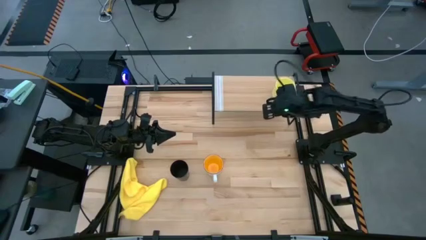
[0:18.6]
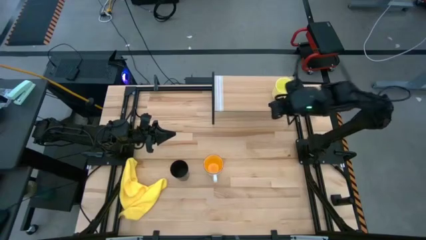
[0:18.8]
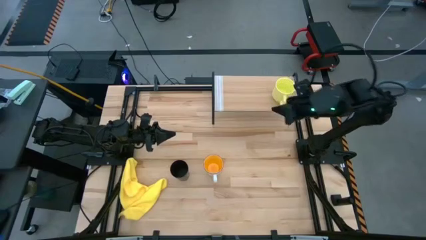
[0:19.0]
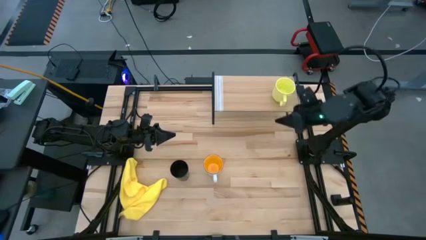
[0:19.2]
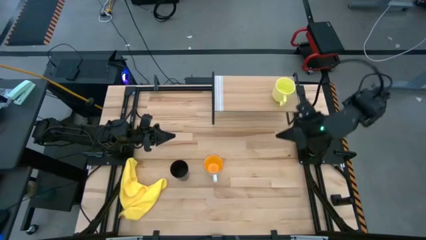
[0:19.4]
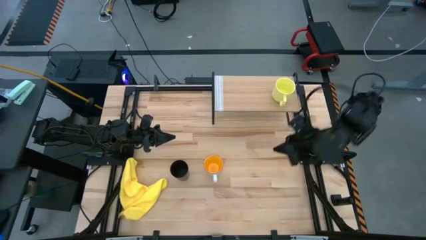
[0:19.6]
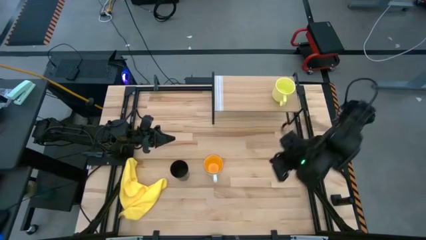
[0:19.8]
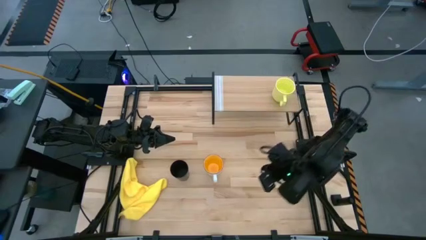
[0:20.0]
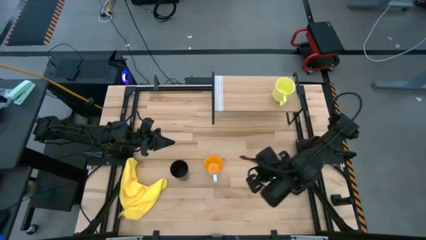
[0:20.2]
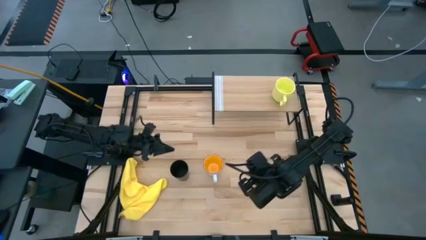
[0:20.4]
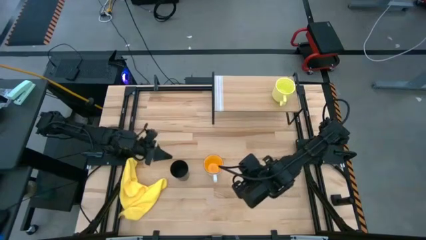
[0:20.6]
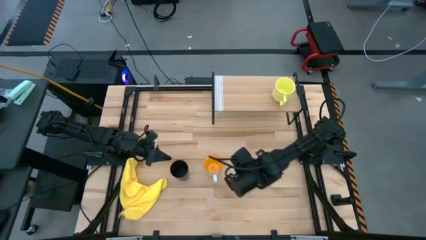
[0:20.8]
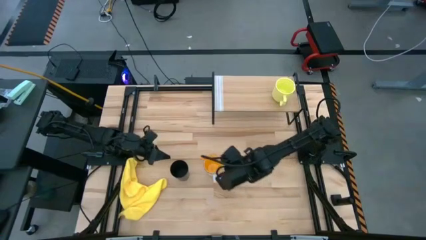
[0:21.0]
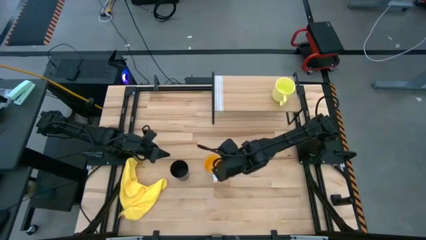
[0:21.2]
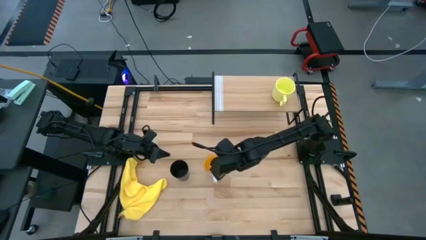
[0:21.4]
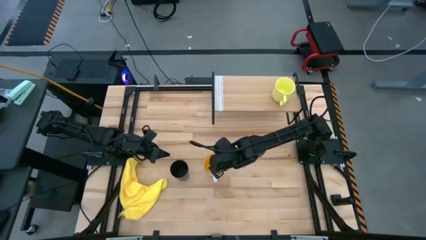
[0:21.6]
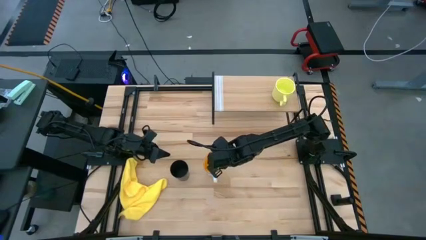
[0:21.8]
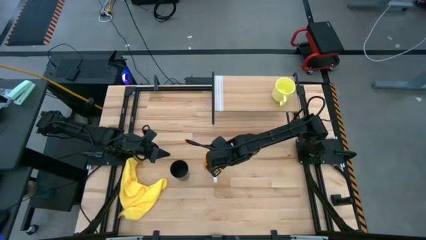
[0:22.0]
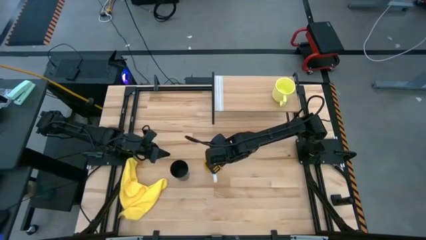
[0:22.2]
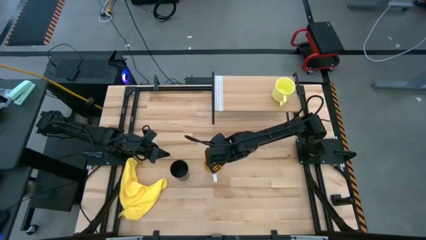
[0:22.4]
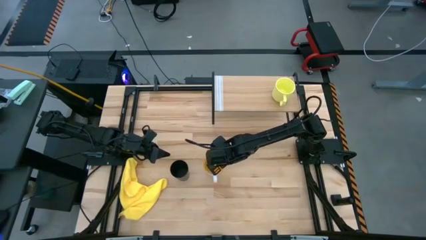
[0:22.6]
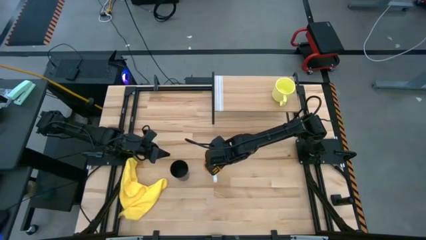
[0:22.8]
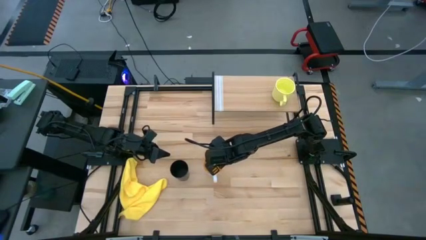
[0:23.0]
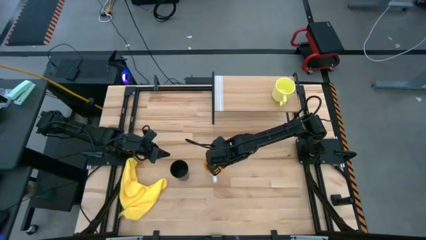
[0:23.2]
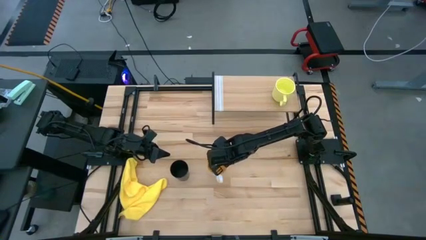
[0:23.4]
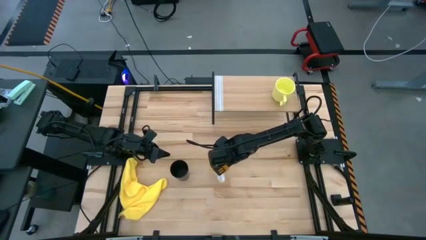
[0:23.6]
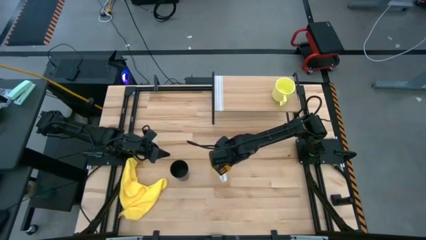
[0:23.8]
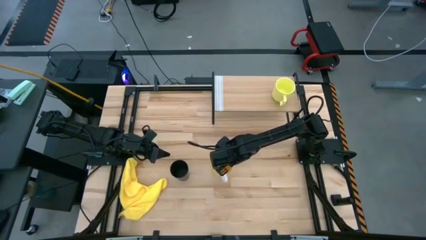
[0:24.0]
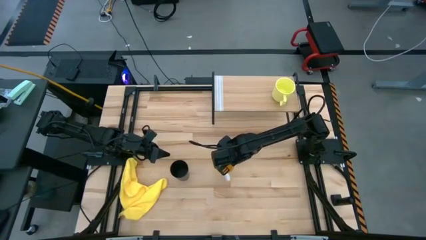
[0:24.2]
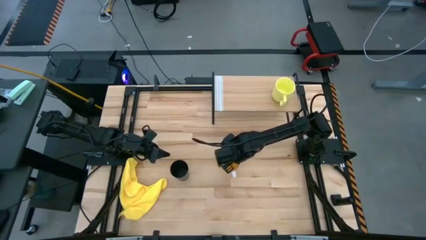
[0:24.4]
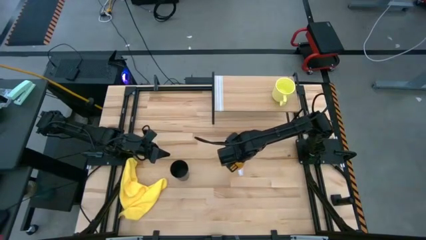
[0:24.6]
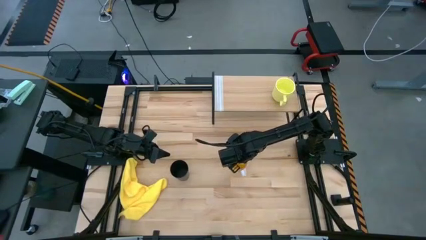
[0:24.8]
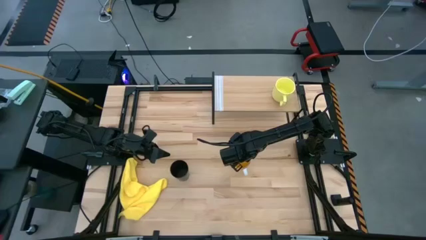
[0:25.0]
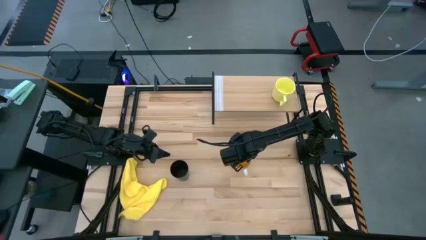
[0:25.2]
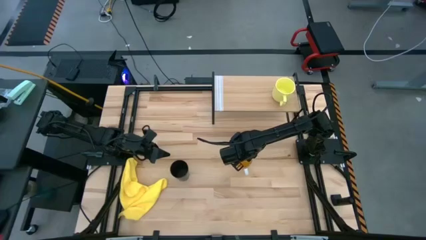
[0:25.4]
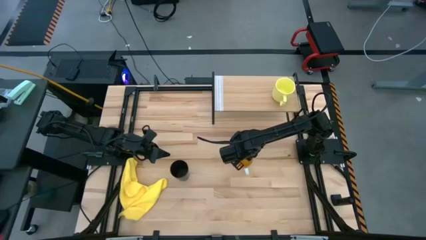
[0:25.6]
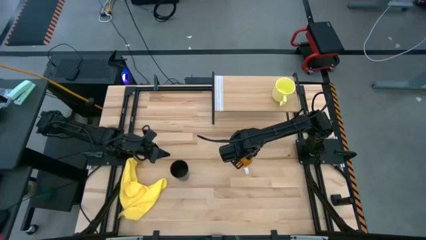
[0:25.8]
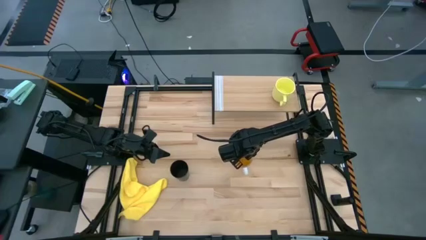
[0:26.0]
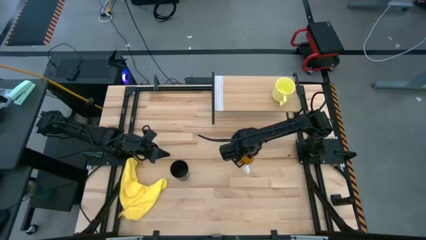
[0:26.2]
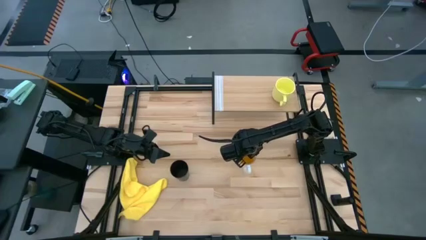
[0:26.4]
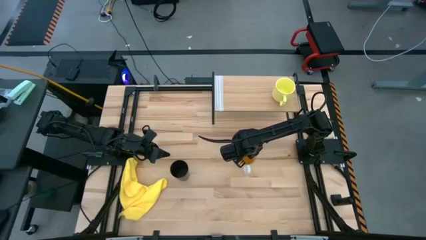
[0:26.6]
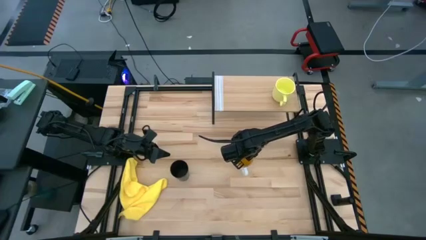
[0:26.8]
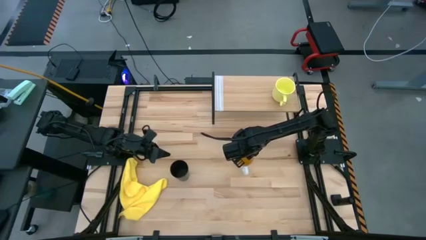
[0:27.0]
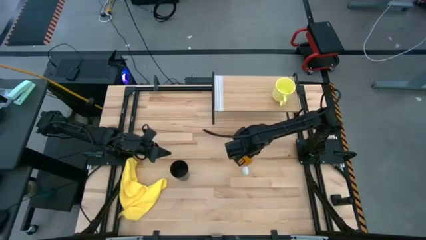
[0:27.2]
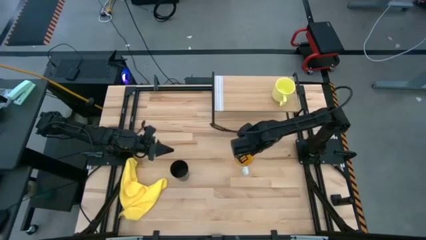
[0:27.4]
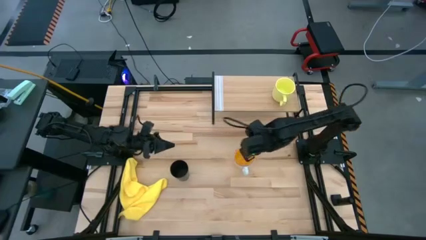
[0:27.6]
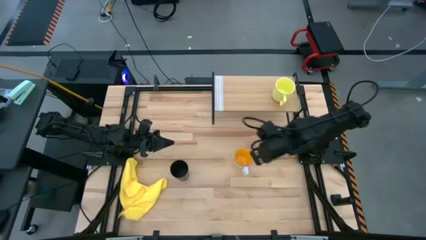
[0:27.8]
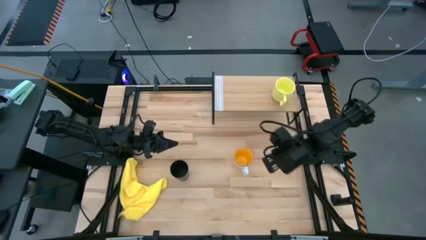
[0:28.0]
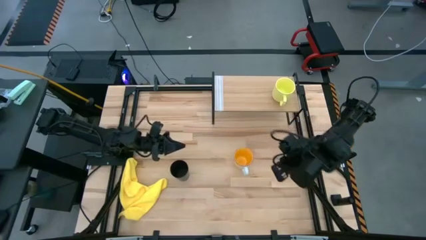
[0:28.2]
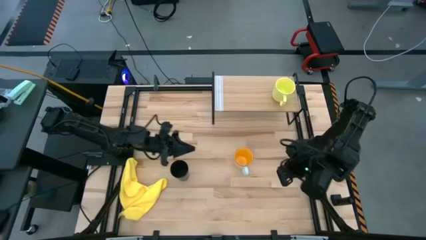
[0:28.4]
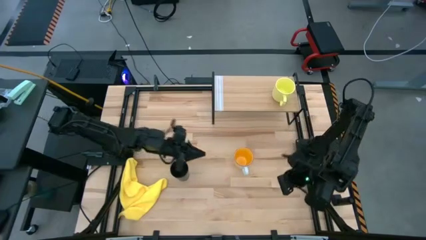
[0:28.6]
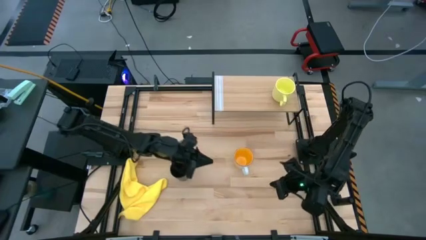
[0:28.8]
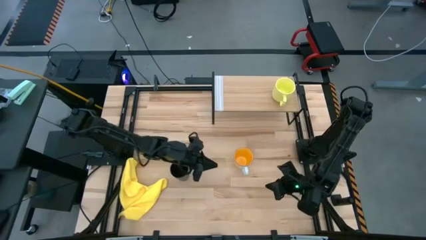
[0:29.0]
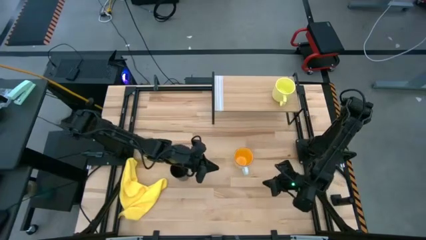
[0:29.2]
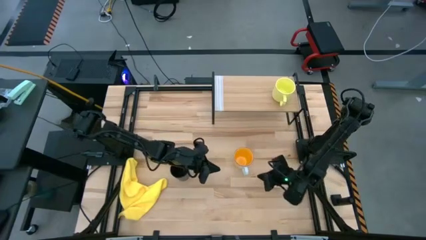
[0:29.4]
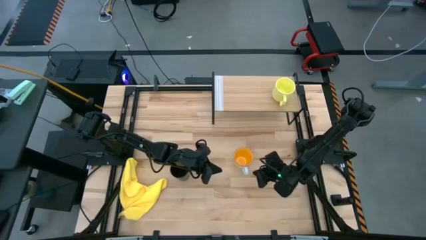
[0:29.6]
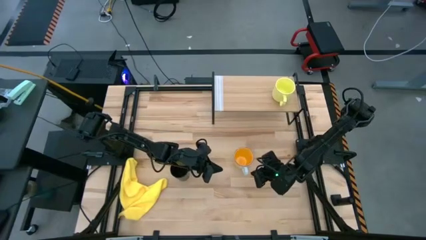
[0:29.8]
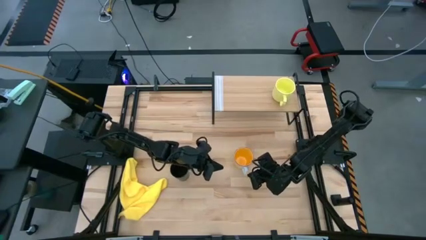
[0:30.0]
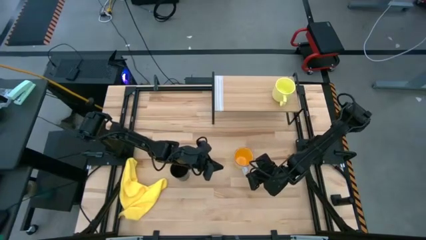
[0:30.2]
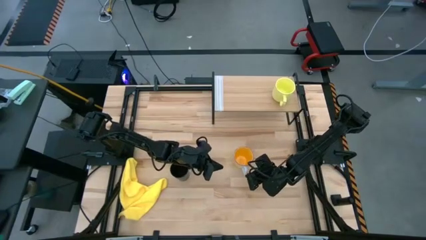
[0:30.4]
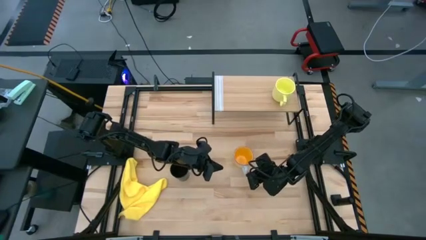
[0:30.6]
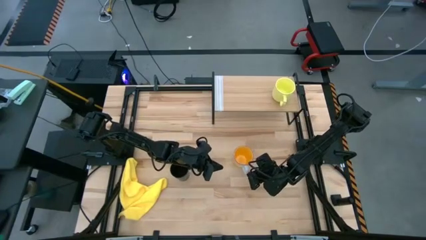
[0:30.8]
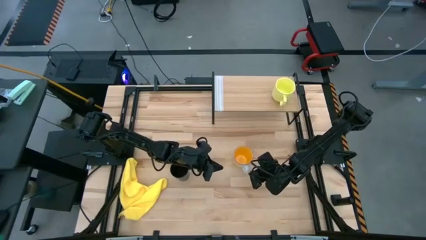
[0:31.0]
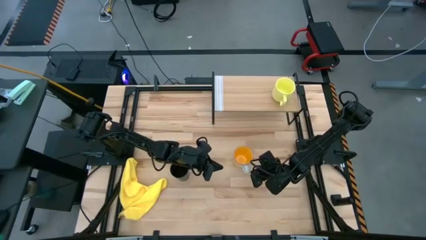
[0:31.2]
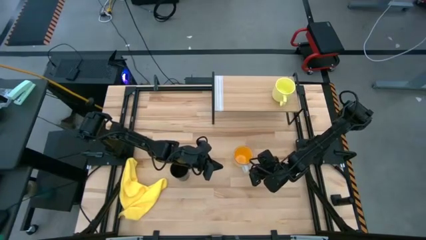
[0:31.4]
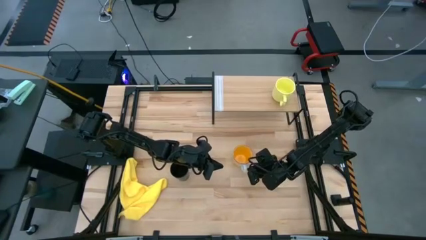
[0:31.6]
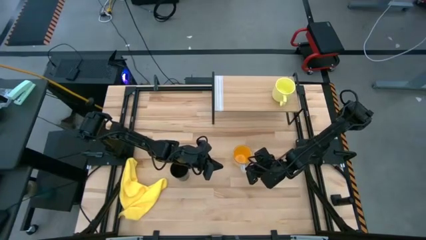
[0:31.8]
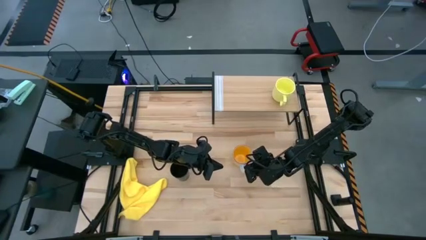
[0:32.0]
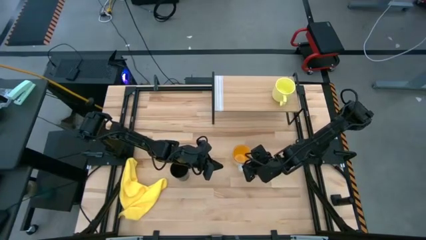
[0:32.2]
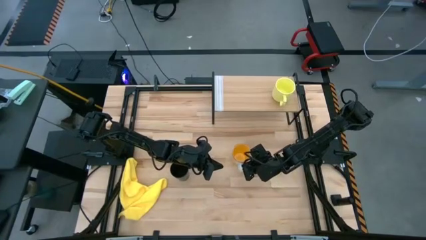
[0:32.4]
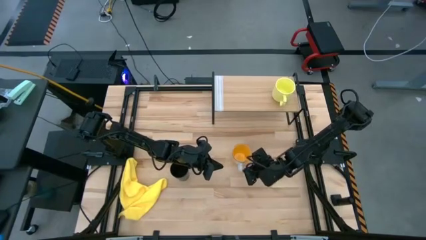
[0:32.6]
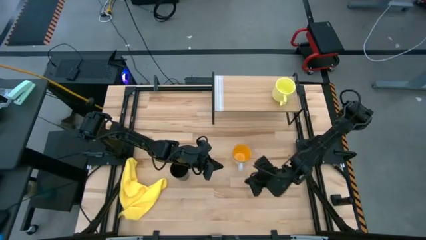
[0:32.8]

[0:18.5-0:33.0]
Task: Stack small to large cups/mugs on shelf
Put the yellow mug on the shelf
